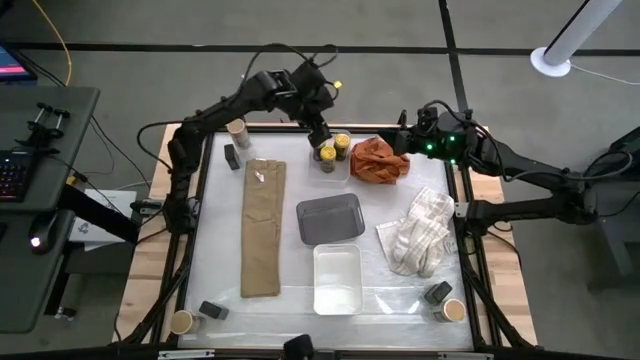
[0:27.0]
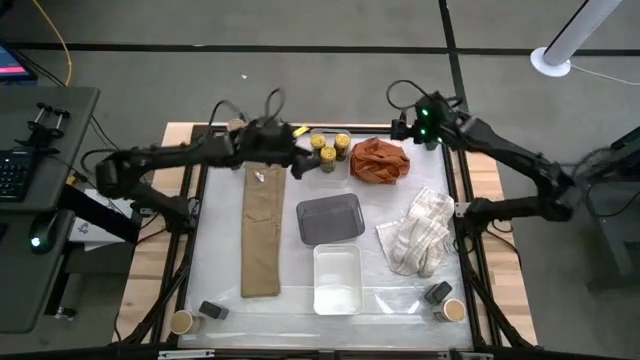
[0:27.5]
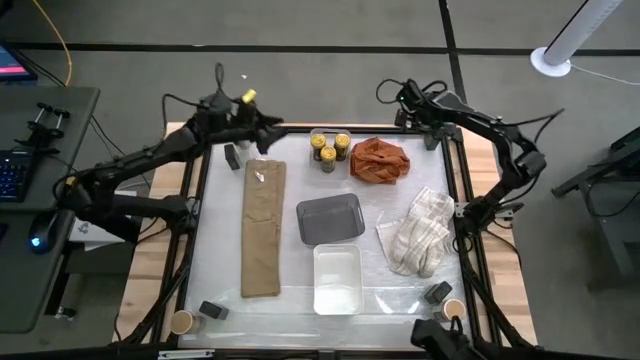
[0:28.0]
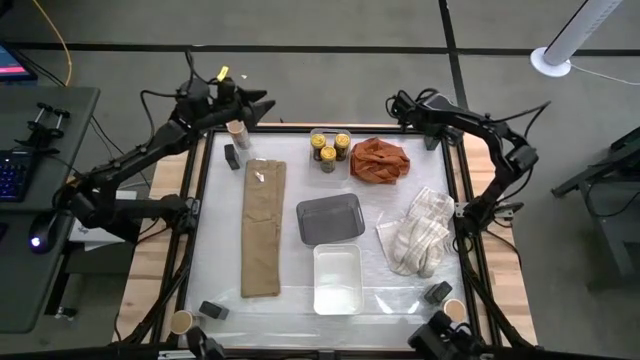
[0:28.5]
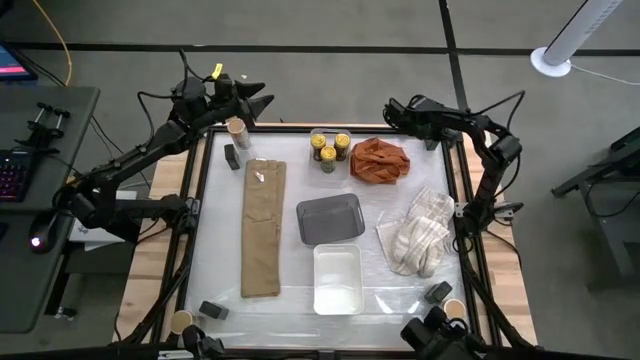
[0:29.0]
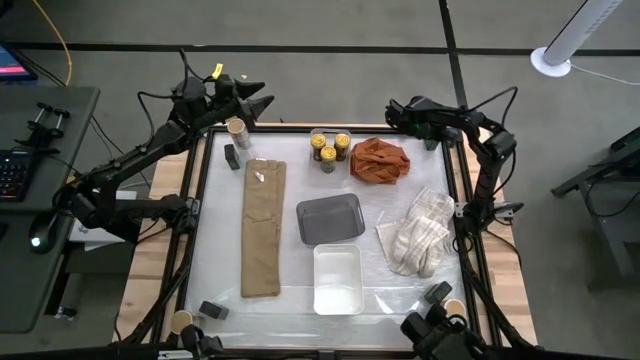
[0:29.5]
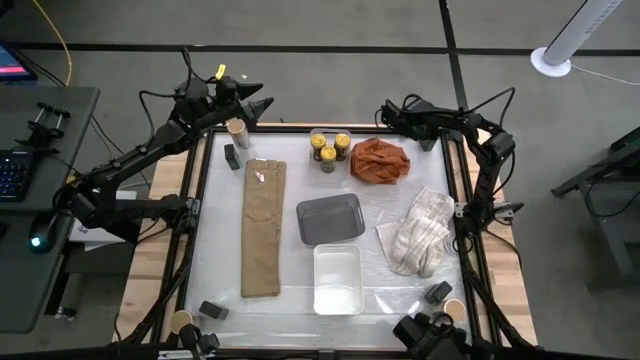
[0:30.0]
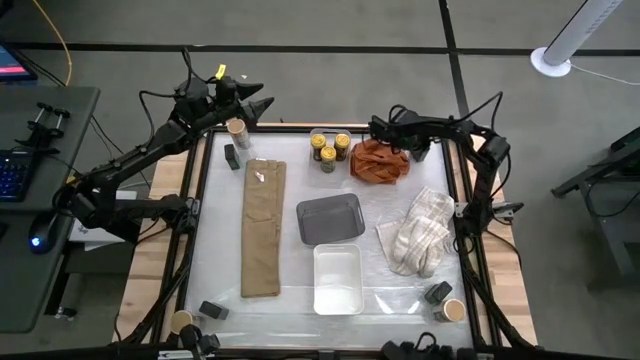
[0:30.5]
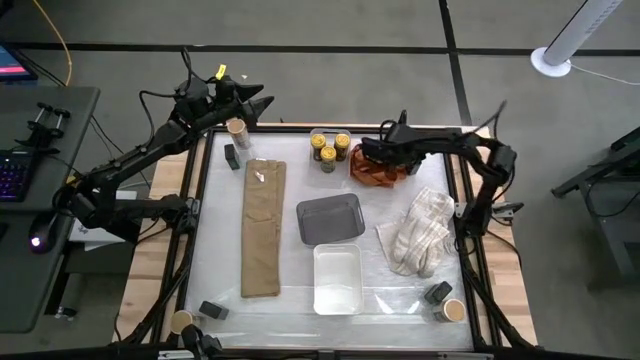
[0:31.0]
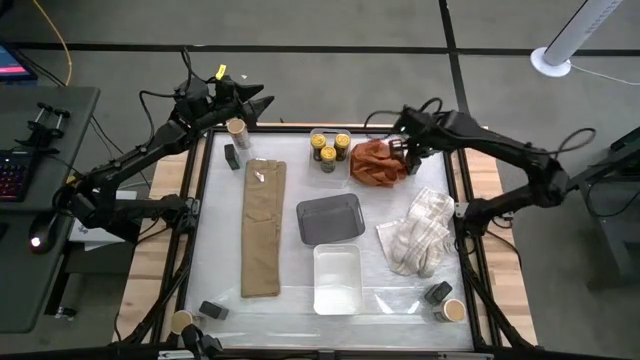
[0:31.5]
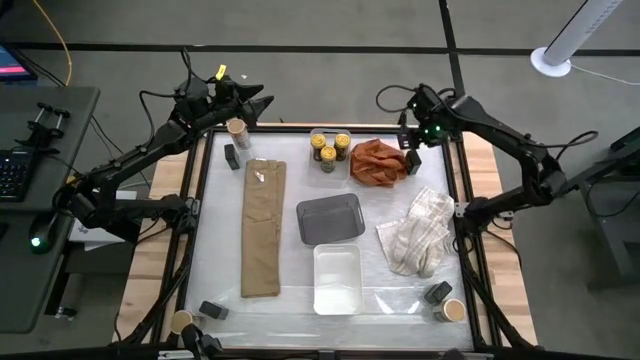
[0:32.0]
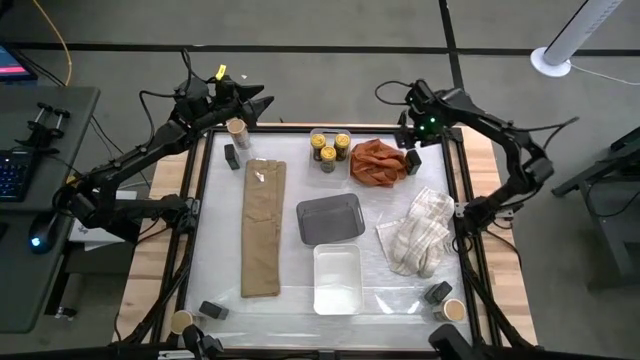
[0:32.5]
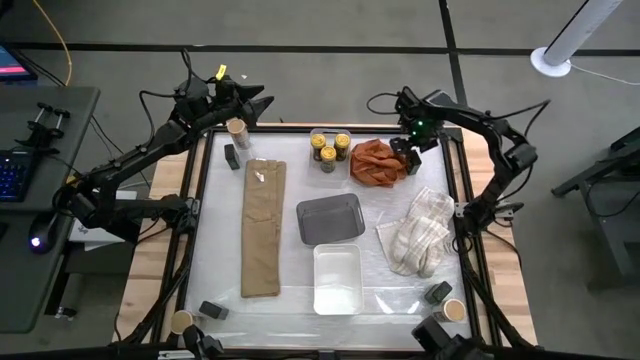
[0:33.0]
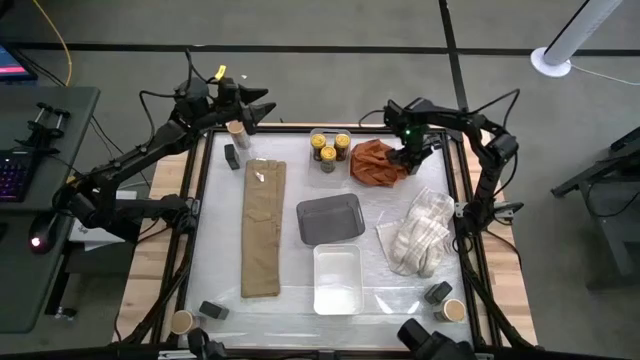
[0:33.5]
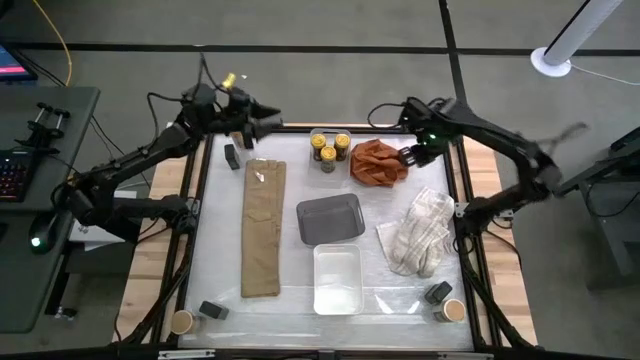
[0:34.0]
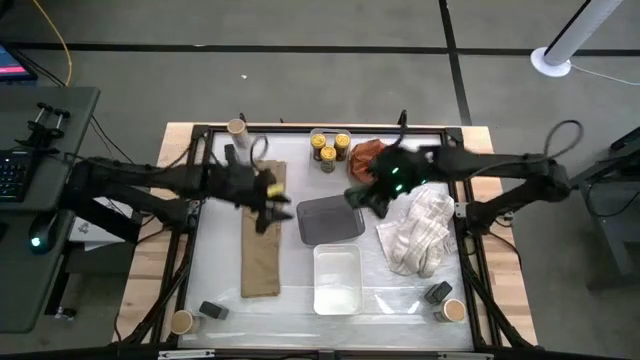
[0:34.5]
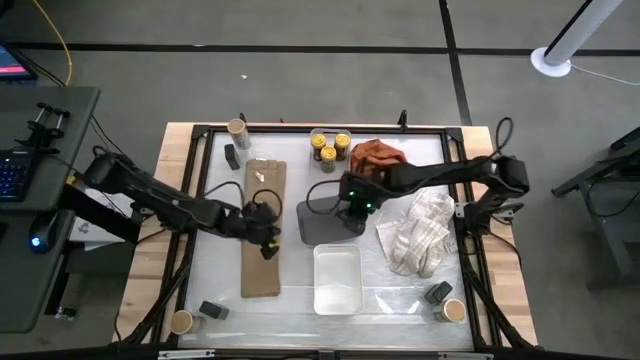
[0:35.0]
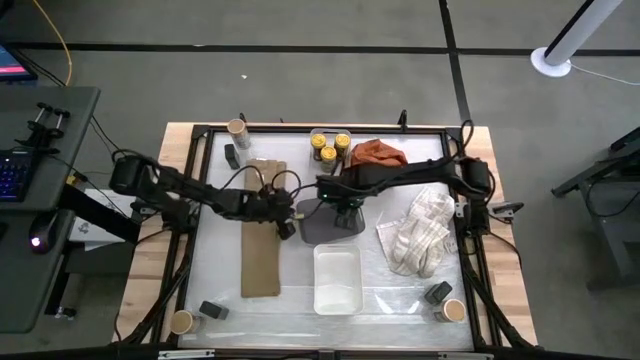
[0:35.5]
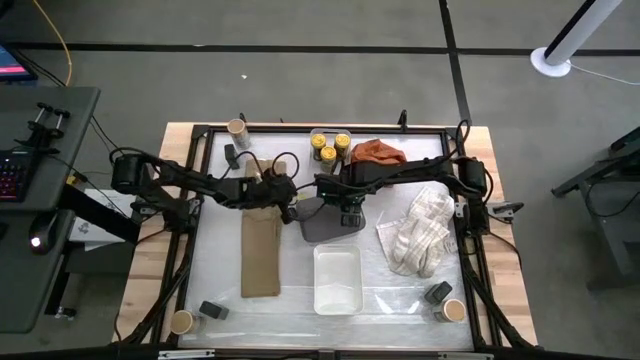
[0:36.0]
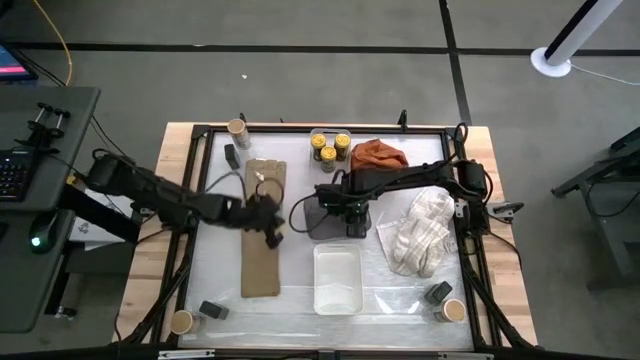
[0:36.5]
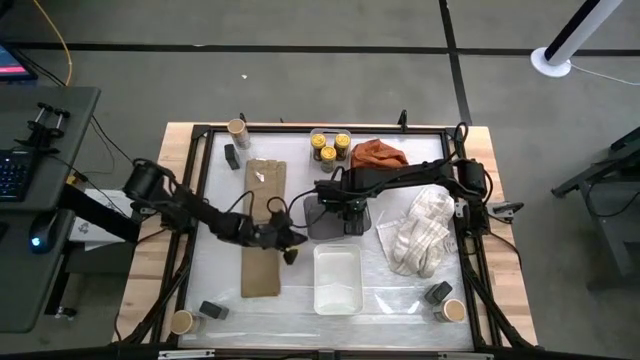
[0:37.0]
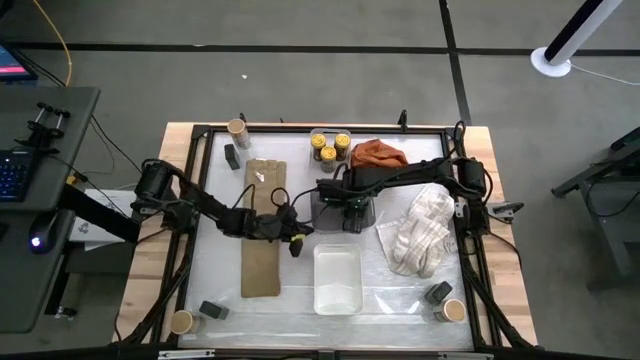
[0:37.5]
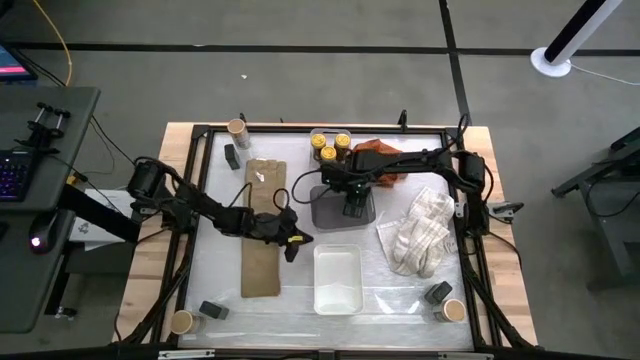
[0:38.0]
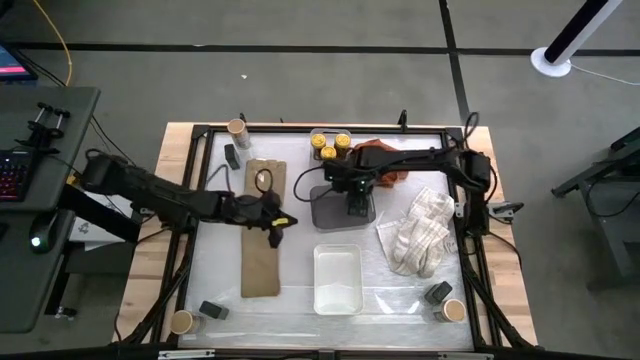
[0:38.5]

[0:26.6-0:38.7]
Task: Sort spices by type
Put the top right black seasoning bottle into the black bin

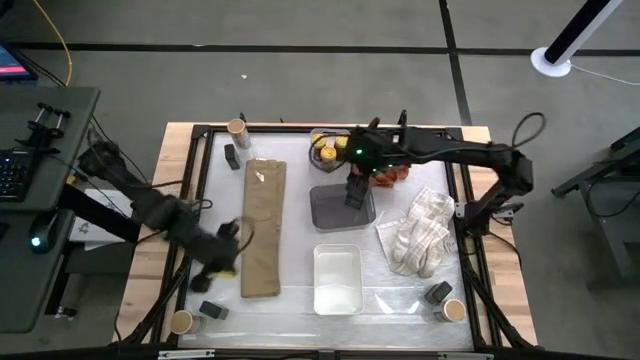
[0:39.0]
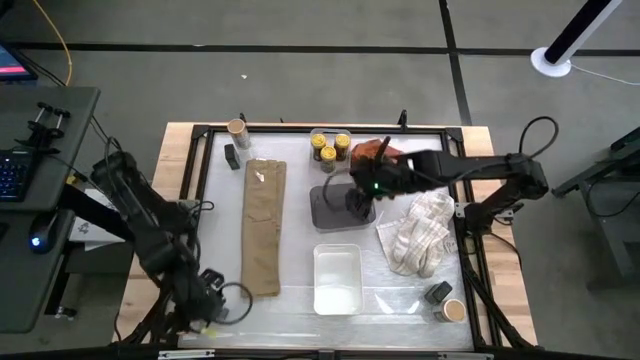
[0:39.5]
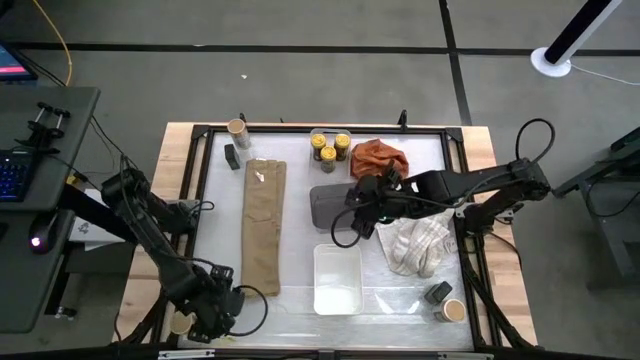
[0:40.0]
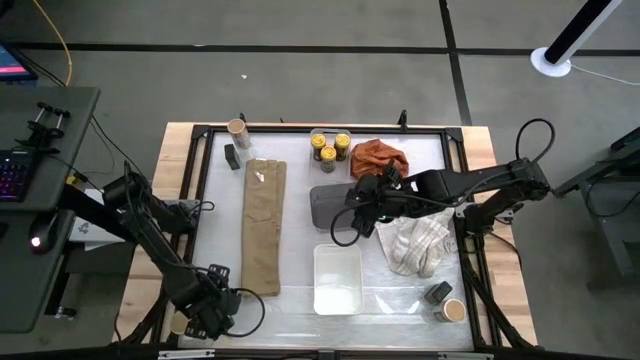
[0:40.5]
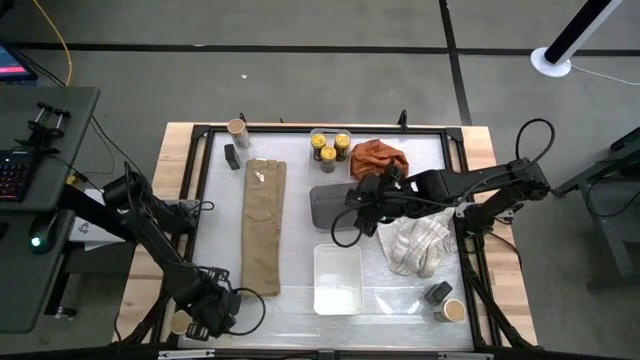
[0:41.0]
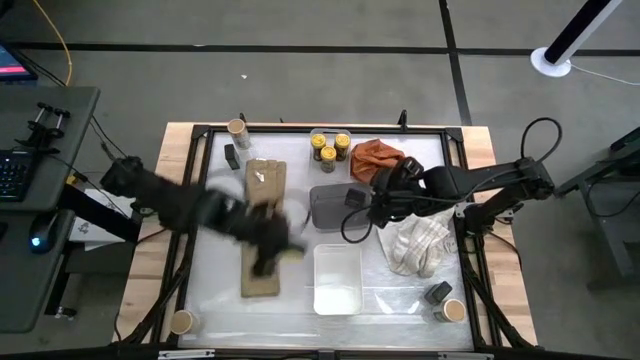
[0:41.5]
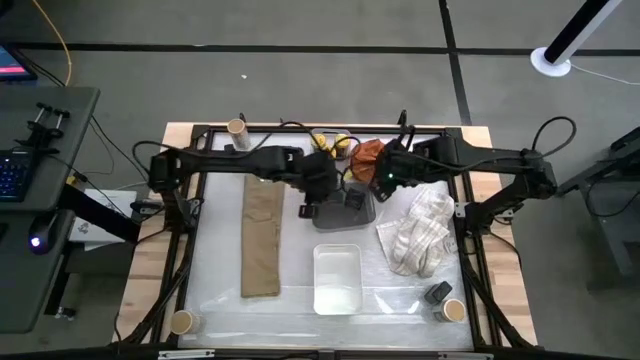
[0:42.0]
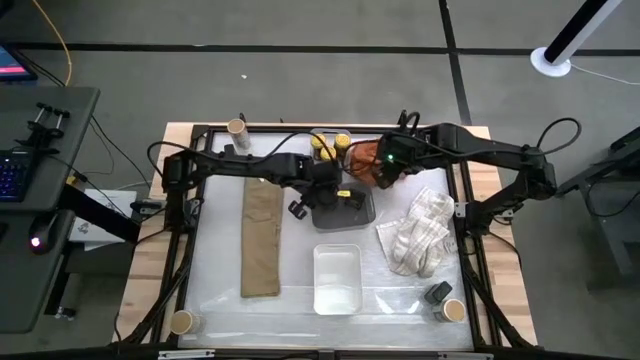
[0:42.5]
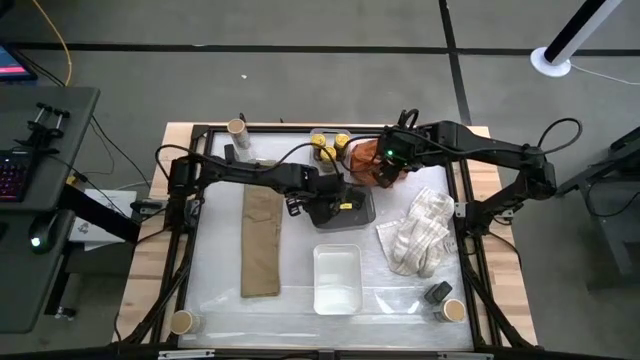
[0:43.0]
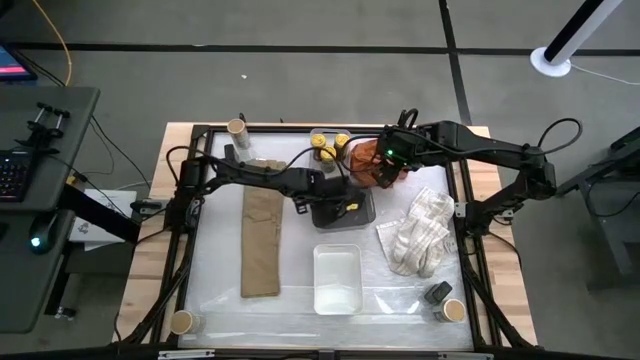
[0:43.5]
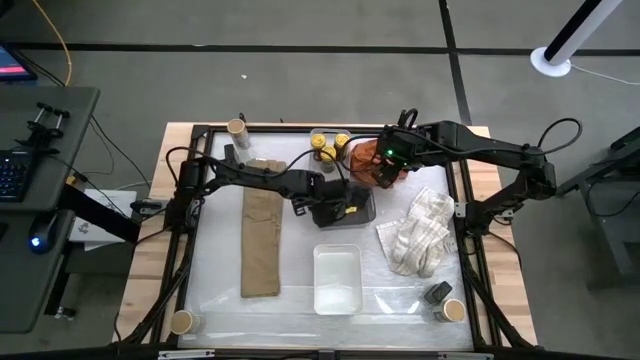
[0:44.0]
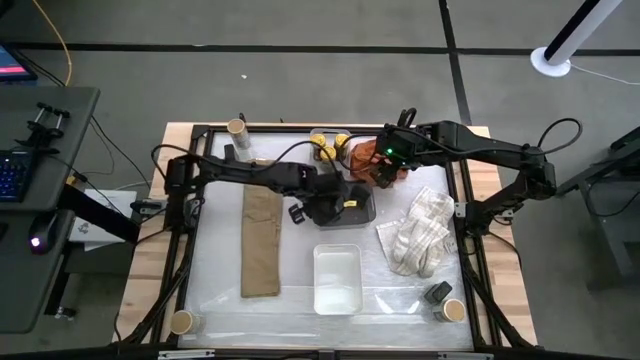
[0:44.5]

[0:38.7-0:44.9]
Put the bottom left black seasoning can into the black bin

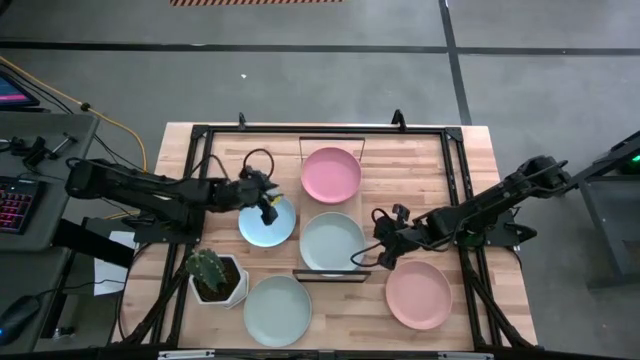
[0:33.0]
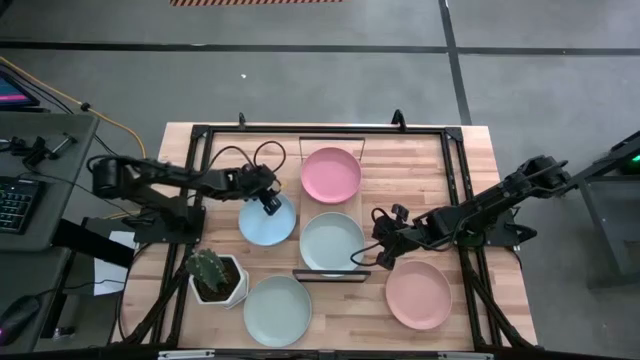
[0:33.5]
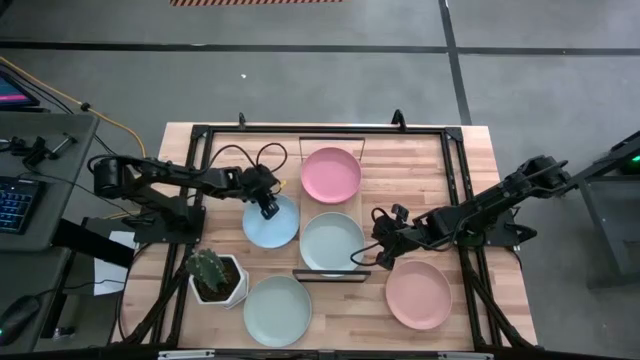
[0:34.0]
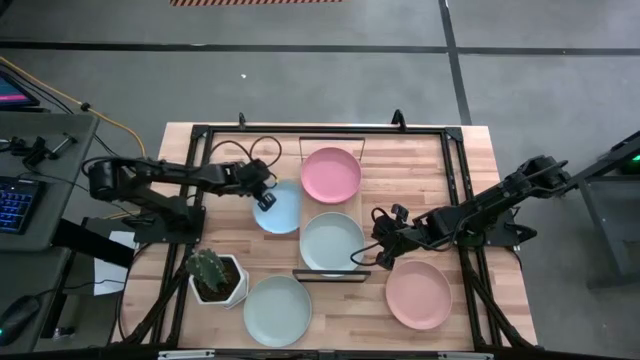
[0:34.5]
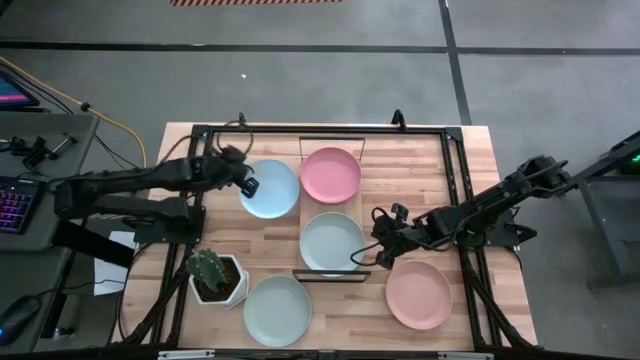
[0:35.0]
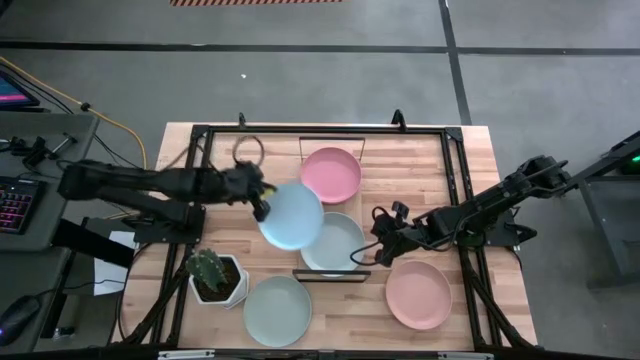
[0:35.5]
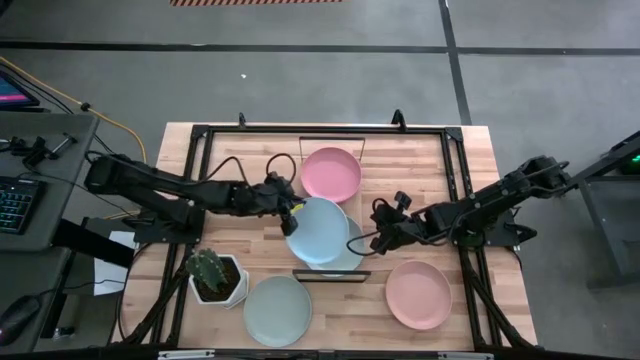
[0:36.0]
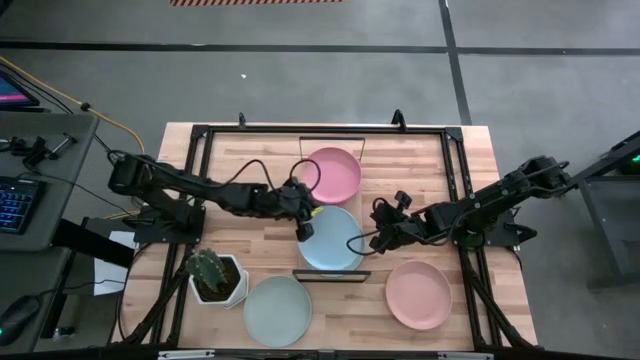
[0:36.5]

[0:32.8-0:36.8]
Task: Place and stack plates onto a shelf
Stack the blue plate on top of the gray plate on the shelf
